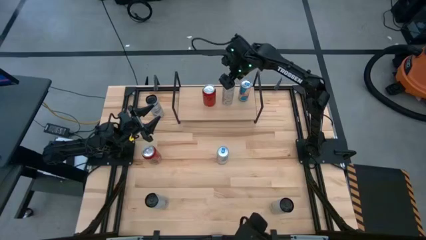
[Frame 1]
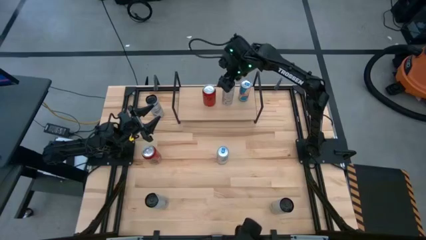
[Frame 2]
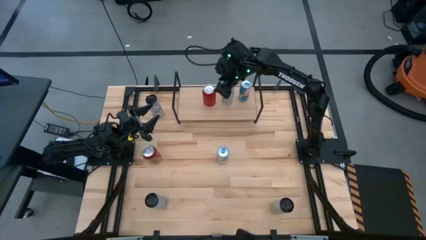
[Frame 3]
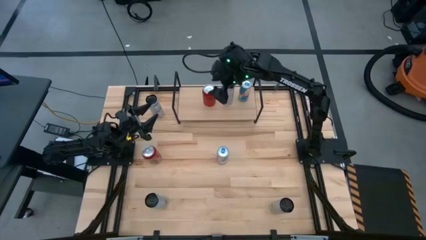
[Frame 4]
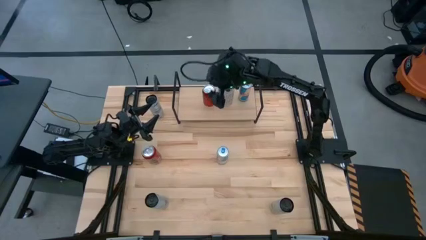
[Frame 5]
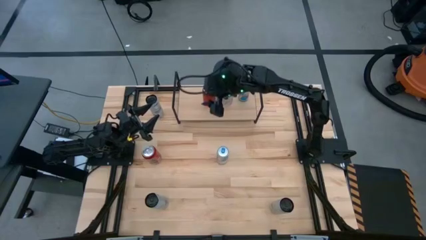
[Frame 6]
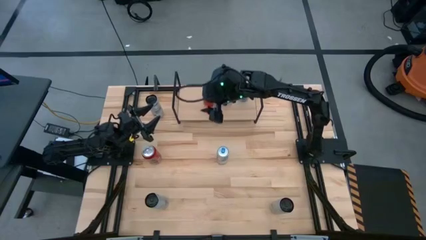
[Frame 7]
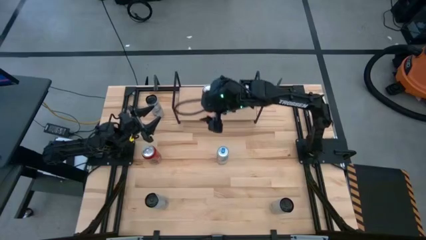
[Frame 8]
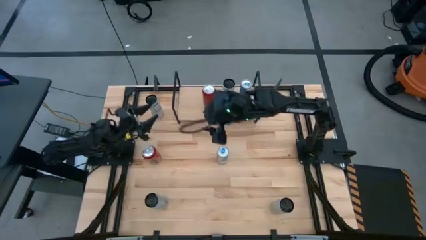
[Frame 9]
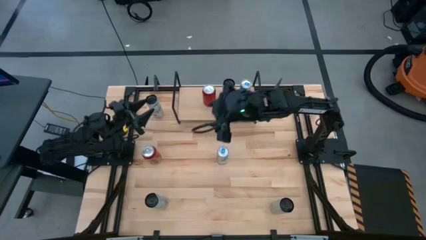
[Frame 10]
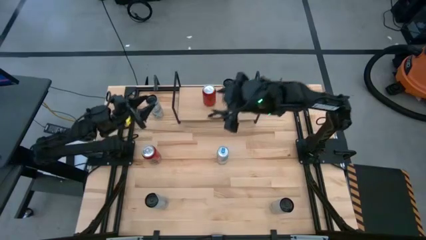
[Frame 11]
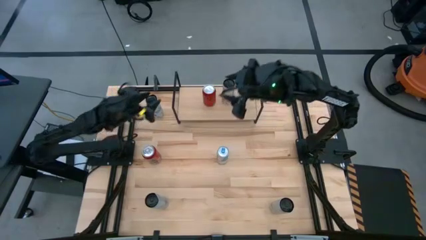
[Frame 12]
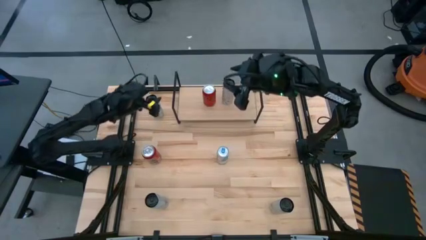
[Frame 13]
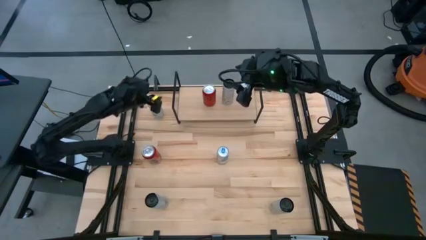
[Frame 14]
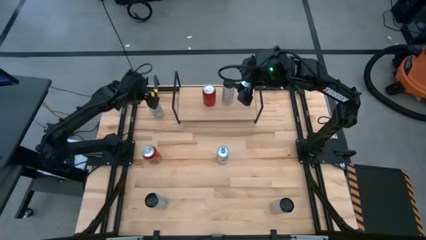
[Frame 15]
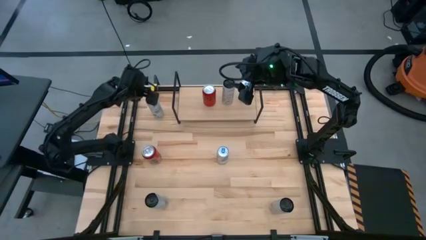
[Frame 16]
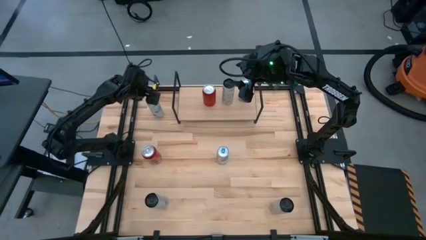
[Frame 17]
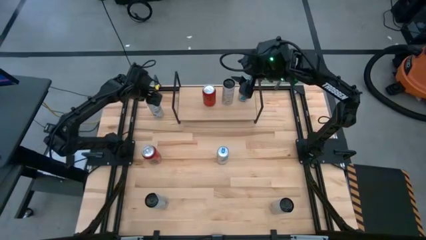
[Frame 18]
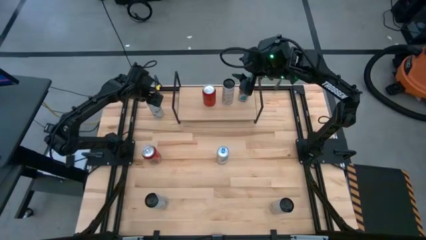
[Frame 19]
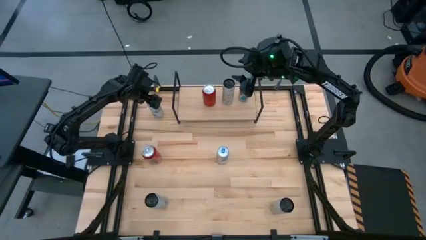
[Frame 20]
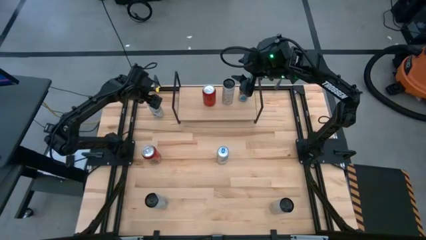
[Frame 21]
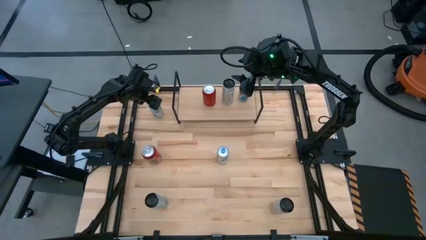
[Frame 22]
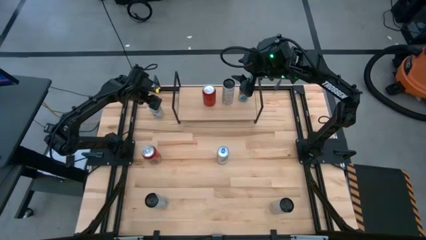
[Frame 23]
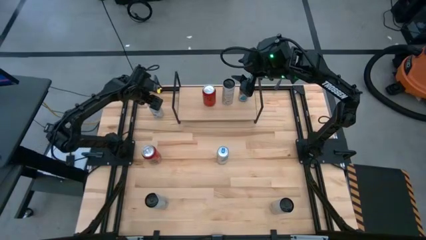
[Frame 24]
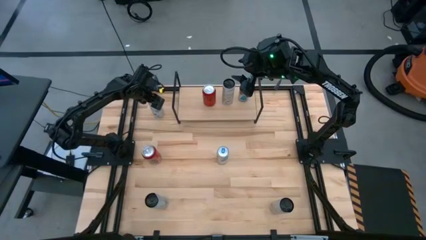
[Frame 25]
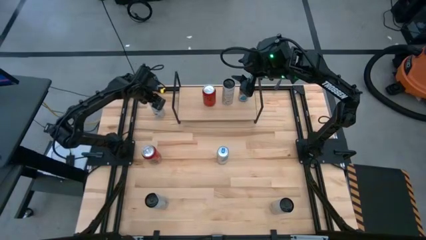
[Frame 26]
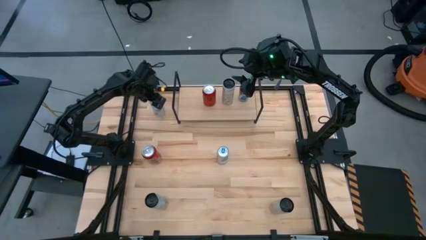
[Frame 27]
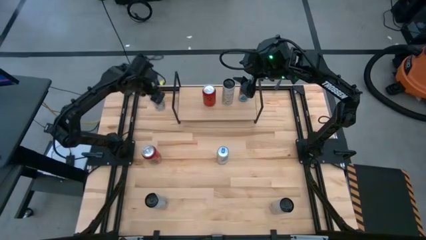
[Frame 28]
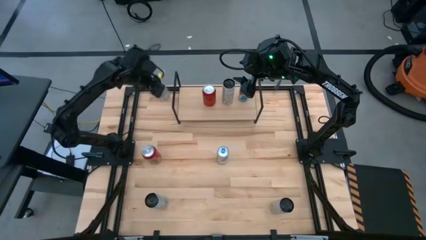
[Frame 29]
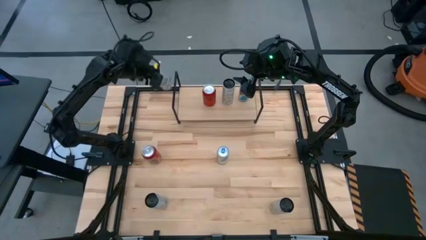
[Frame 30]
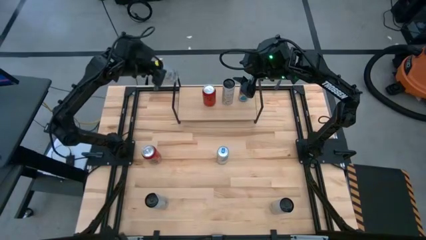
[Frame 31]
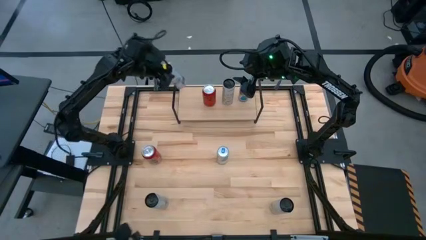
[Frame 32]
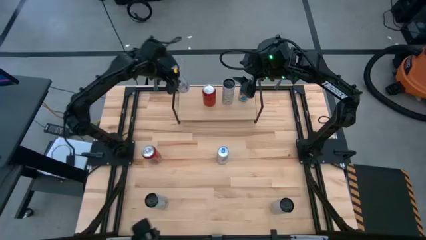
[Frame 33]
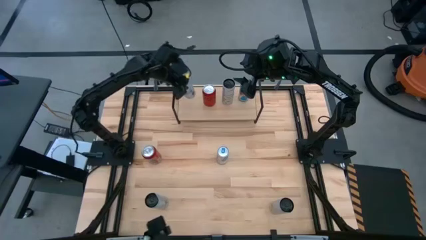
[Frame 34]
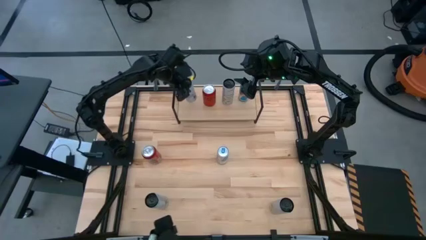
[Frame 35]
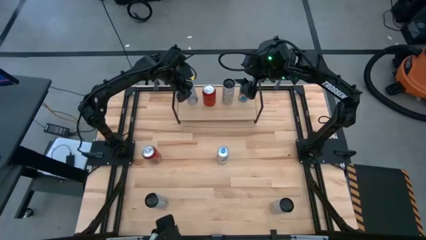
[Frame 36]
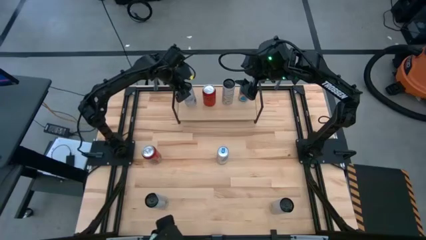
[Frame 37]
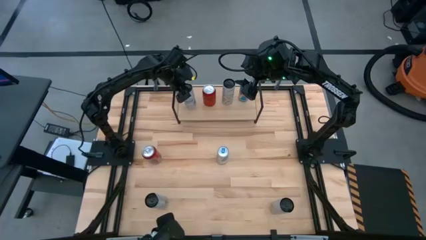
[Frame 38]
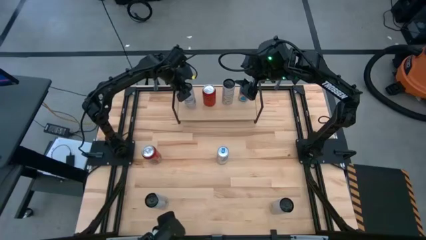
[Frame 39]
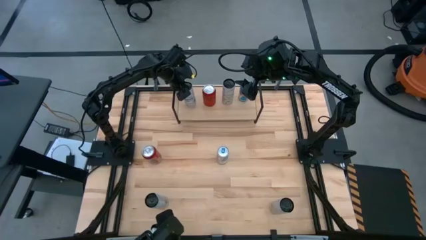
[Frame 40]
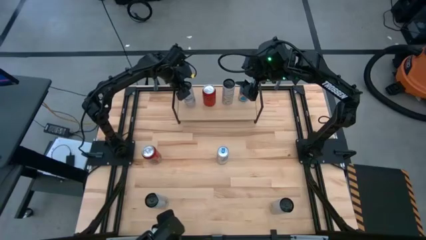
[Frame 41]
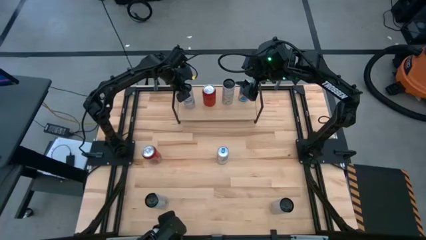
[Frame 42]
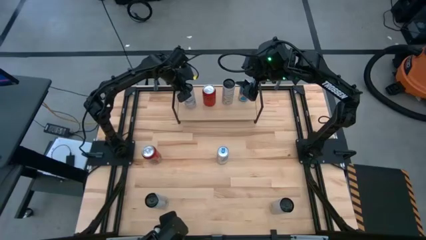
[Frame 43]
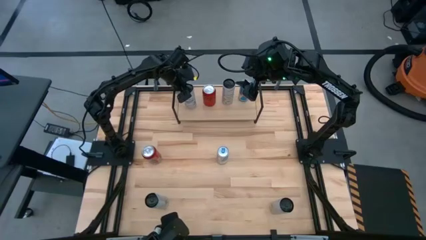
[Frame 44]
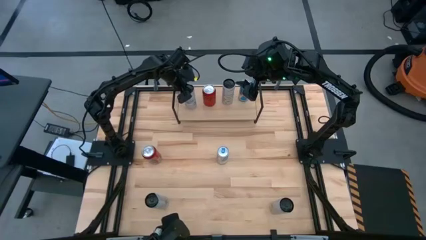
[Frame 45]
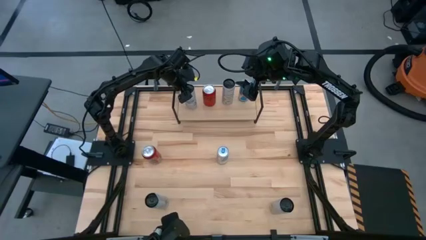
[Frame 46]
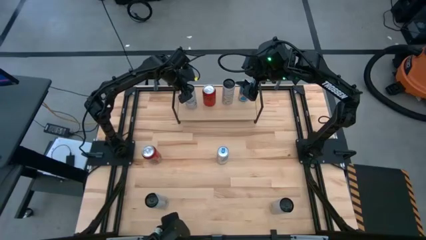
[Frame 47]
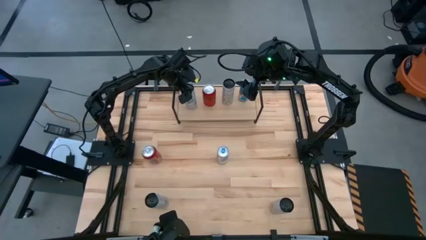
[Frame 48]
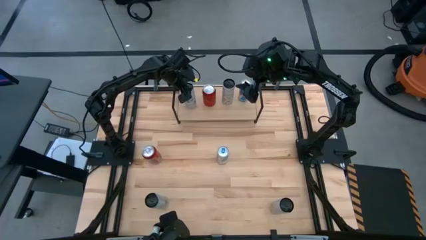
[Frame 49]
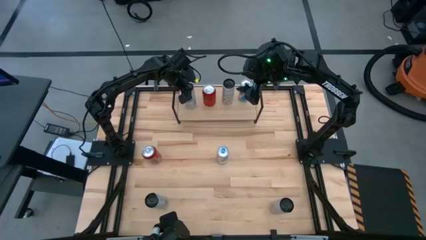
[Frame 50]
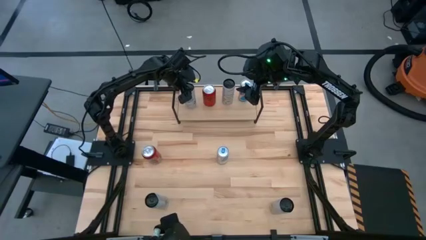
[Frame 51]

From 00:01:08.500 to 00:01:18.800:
Task: Place canned beverage on shelf
Put the top white-blue soda can on the shelf
